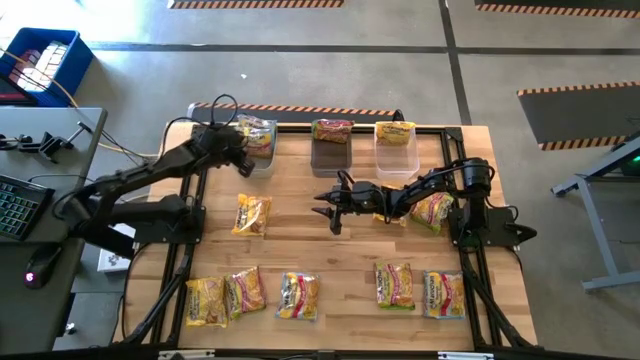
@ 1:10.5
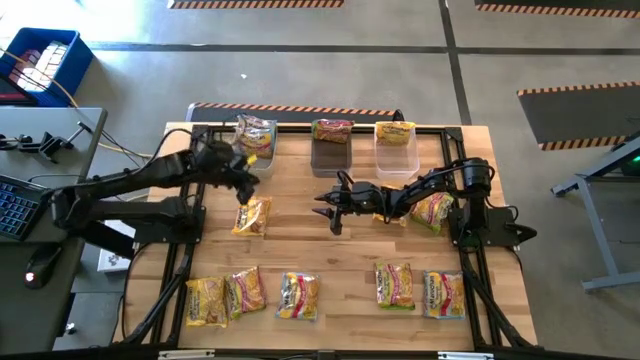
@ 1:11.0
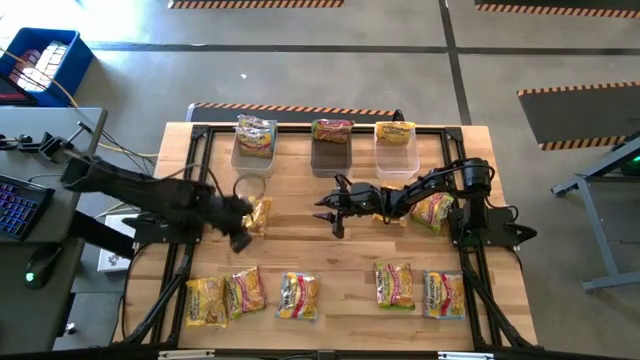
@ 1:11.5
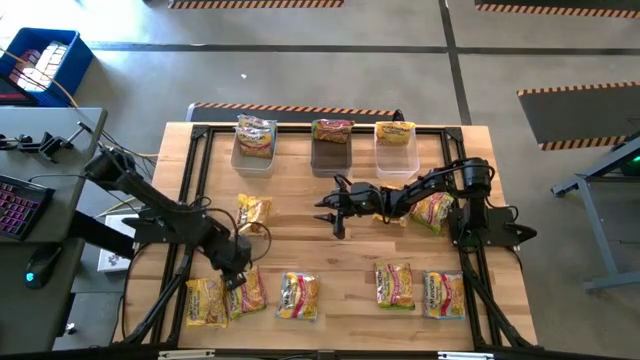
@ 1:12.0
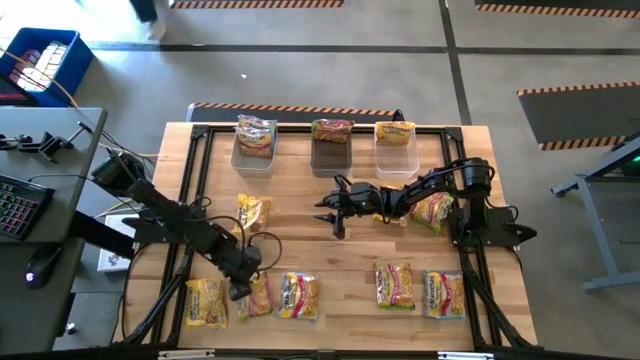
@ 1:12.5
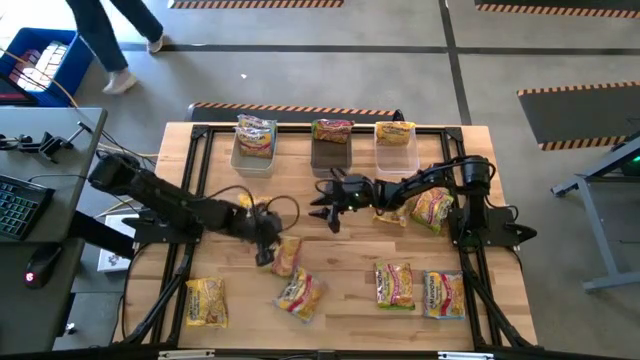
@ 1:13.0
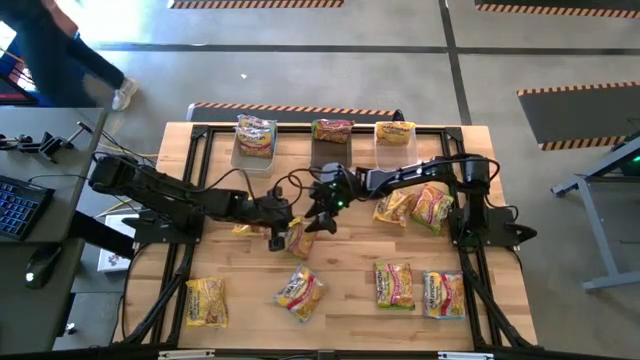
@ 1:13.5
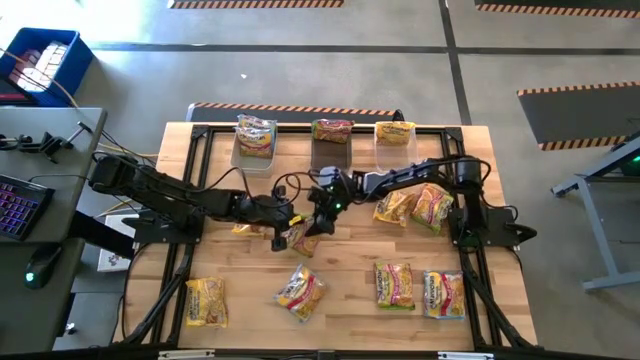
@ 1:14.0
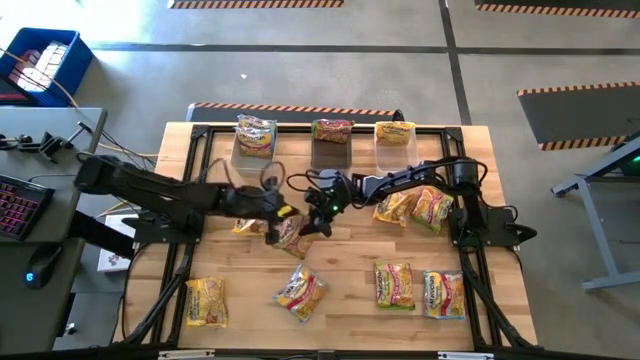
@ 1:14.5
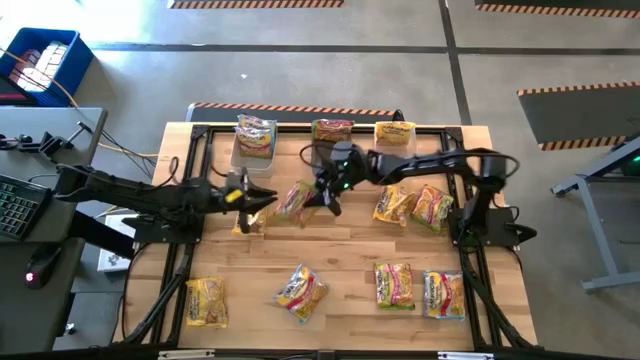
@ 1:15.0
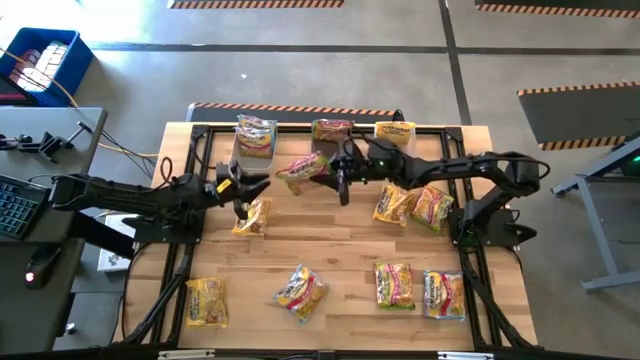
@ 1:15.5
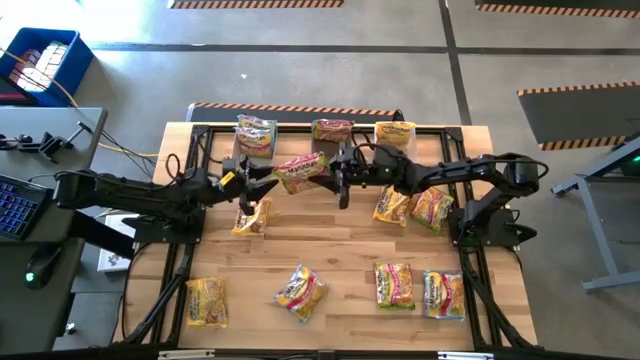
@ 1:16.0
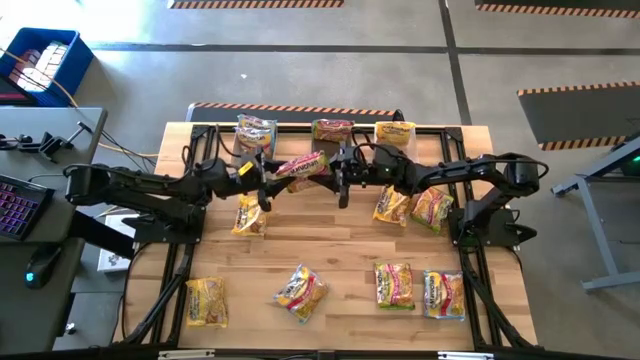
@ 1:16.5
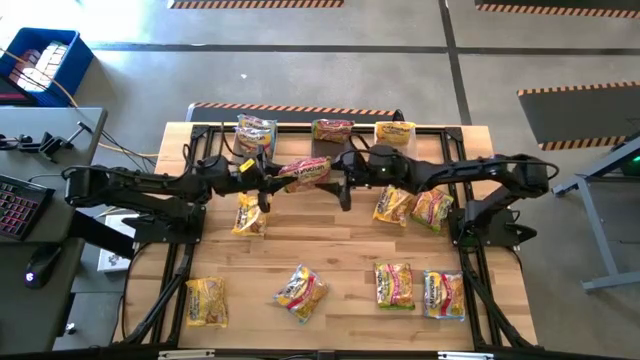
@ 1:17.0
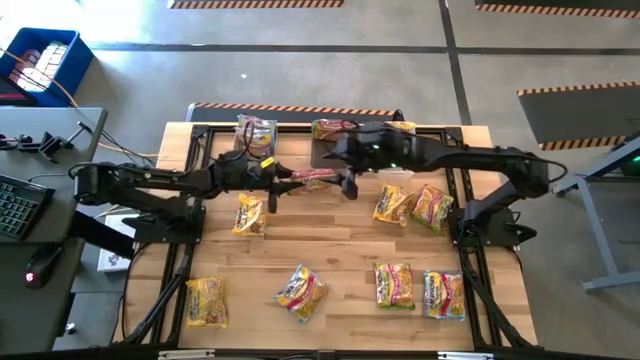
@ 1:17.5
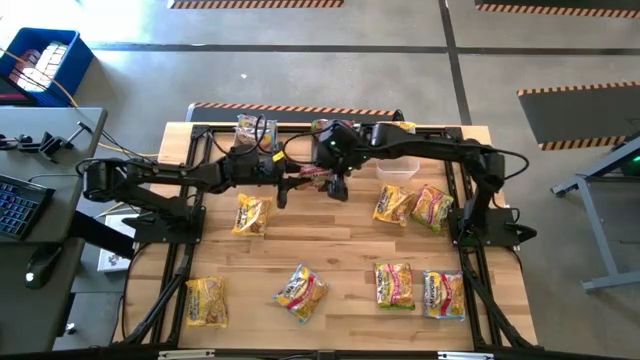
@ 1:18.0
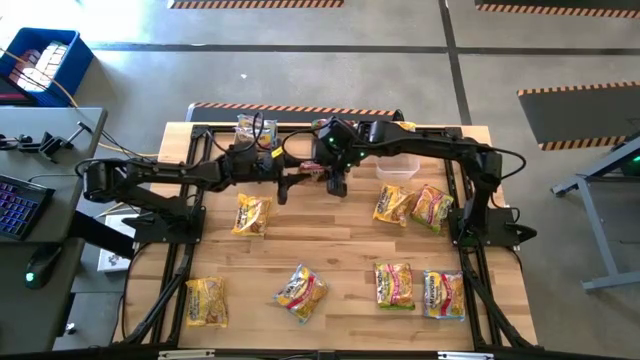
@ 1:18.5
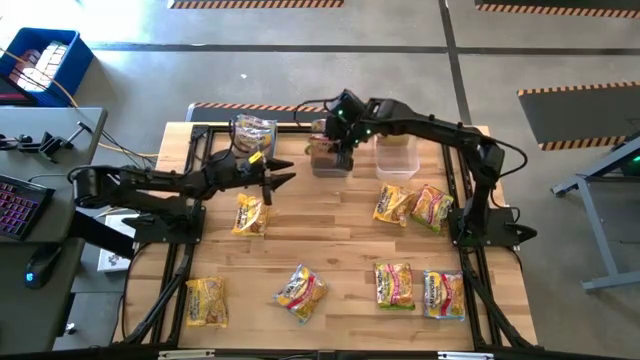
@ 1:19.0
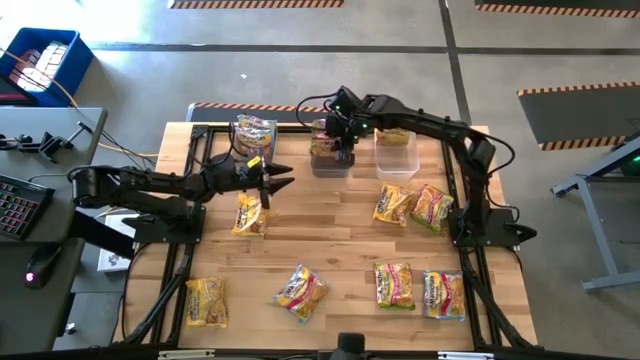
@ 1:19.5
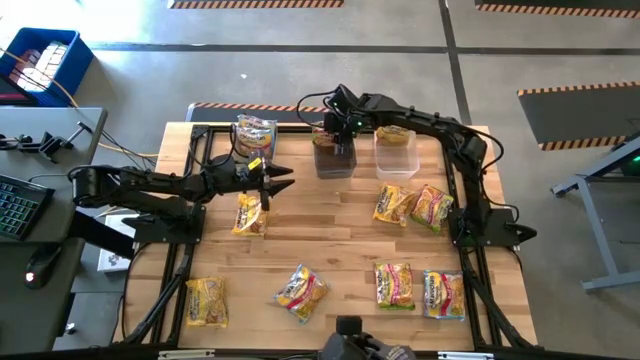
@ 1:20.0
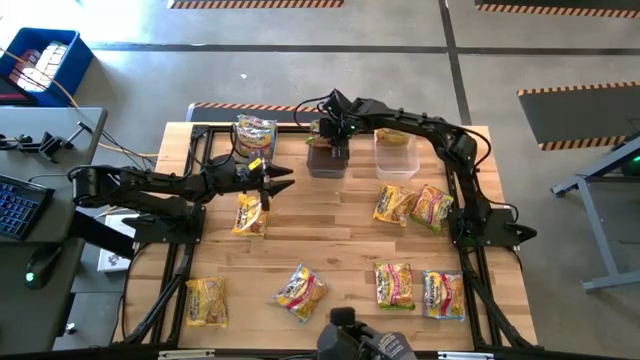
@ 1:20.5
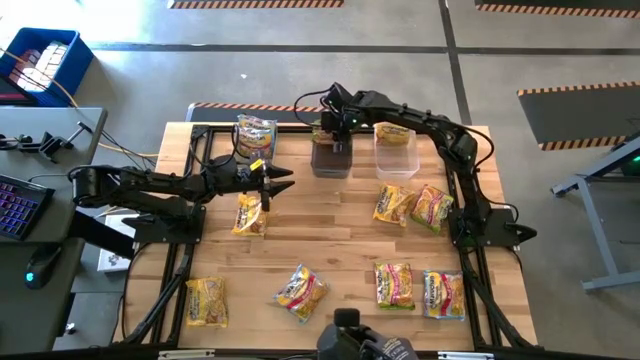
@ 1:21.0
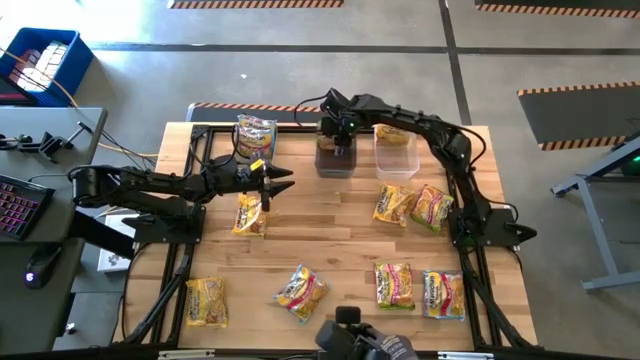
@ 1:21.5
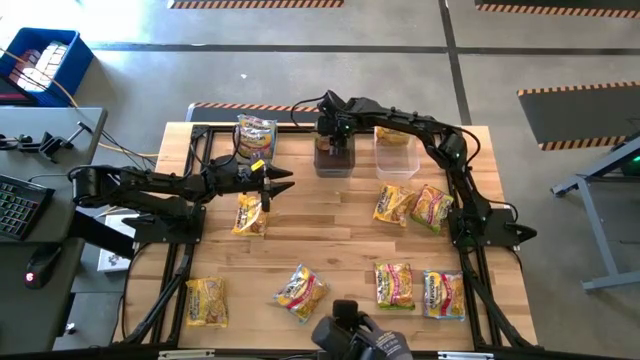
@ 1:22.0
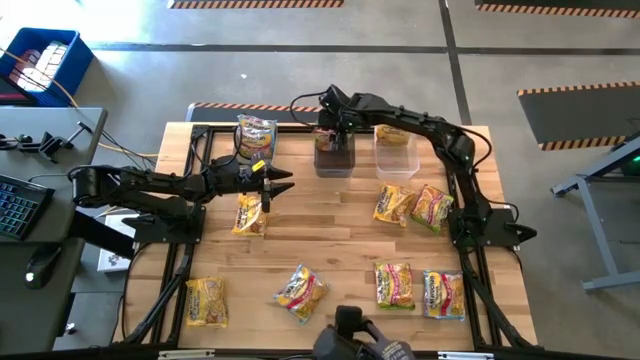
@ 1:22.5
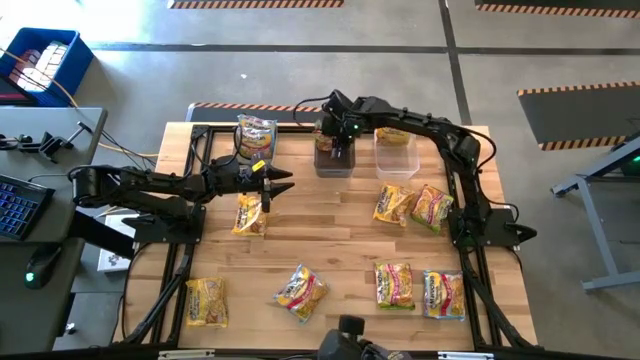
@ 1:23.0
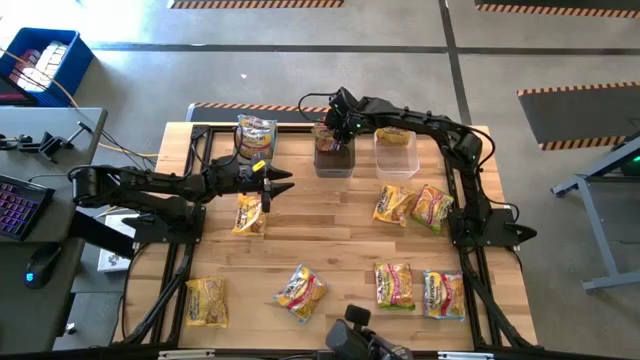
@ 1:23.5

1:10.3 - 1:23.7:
Task: Sort Maruchan noodles
Put the green noodle pack into the black bin

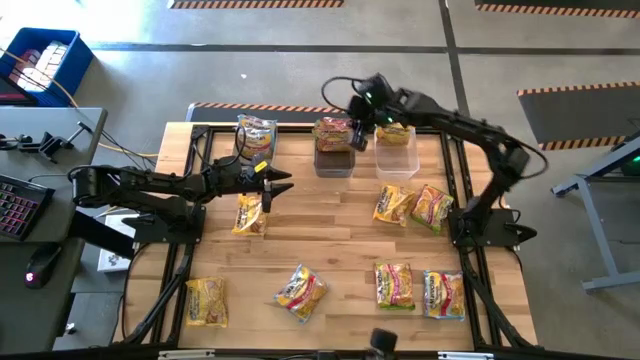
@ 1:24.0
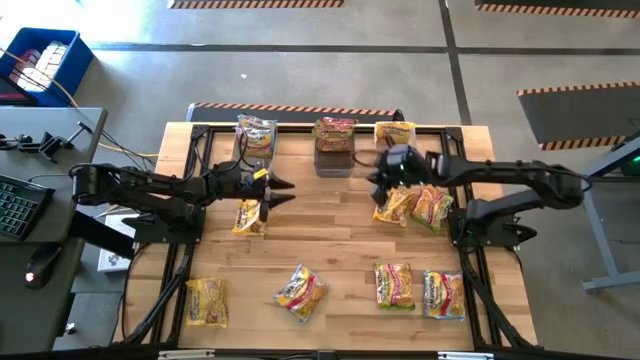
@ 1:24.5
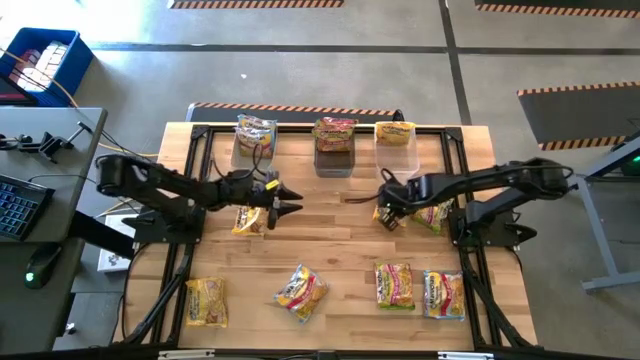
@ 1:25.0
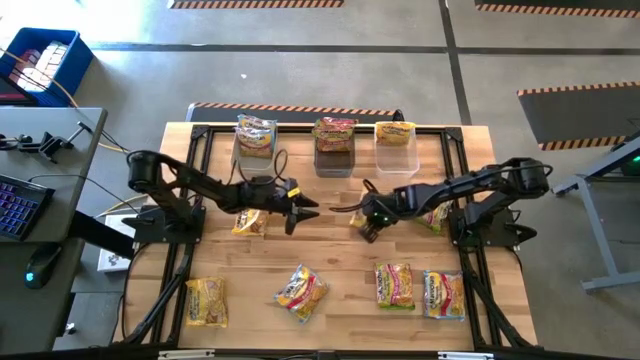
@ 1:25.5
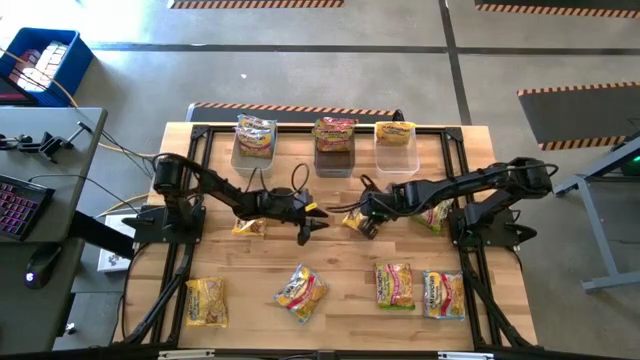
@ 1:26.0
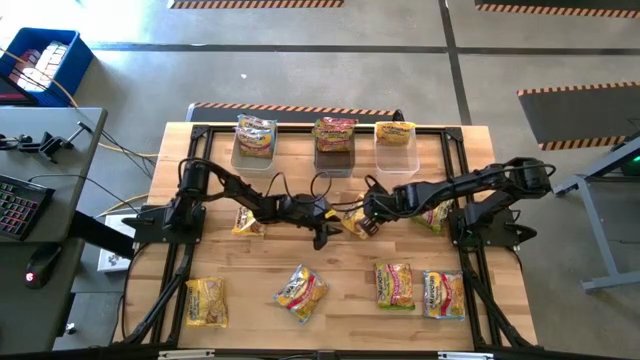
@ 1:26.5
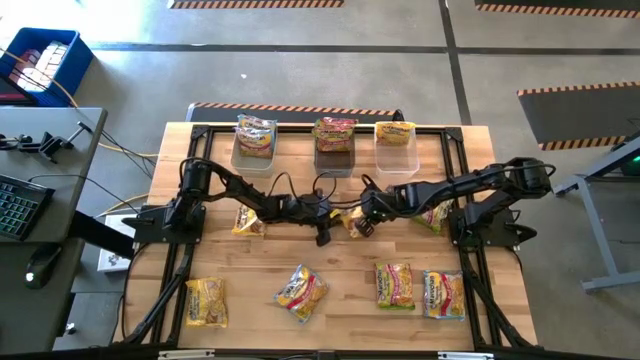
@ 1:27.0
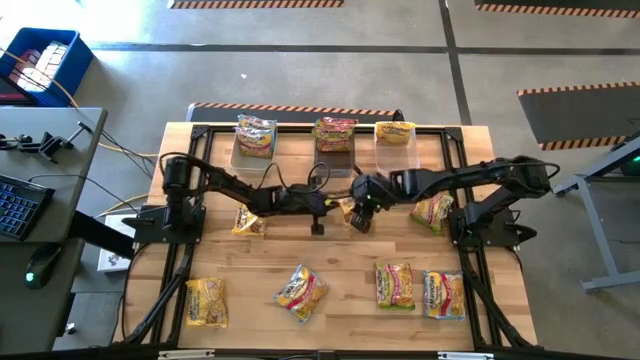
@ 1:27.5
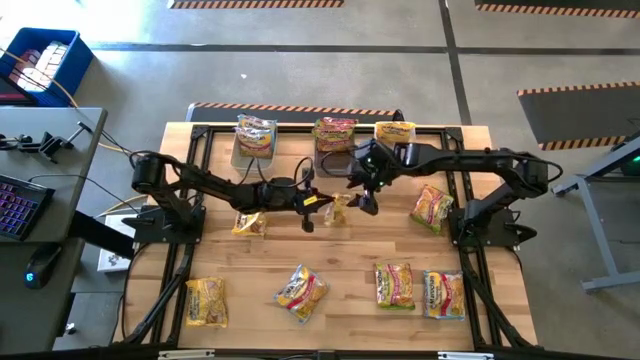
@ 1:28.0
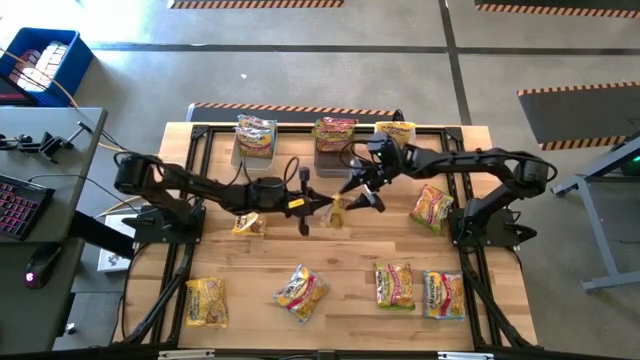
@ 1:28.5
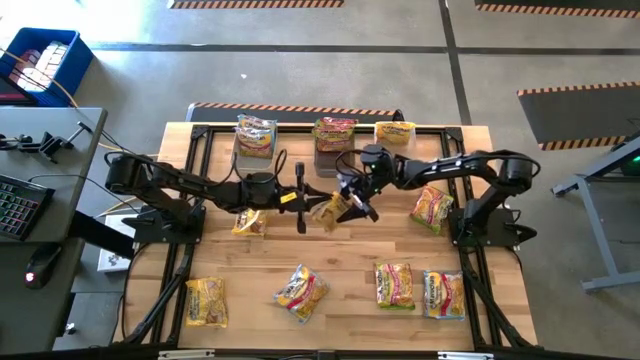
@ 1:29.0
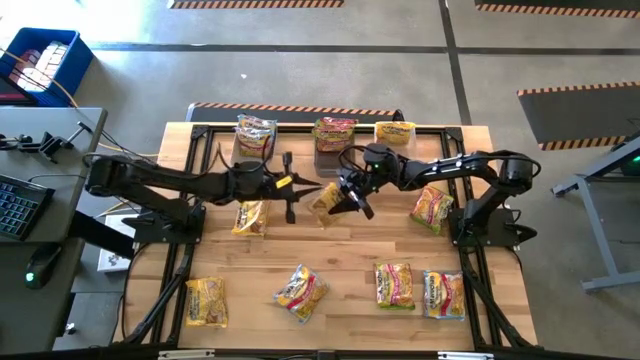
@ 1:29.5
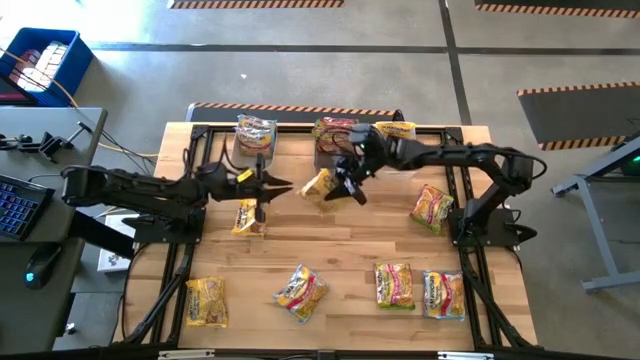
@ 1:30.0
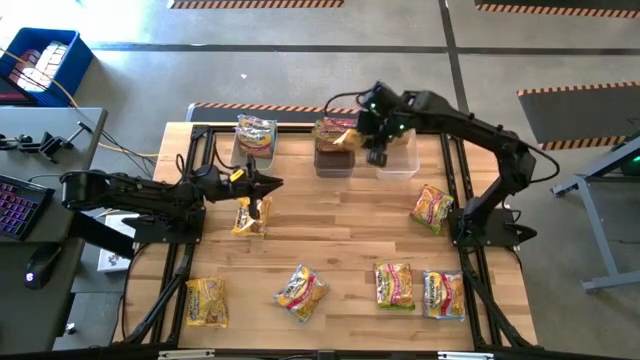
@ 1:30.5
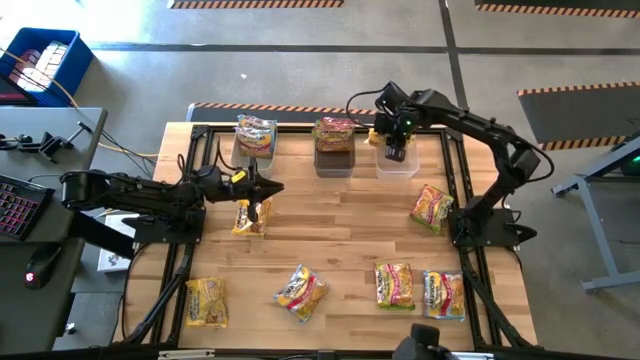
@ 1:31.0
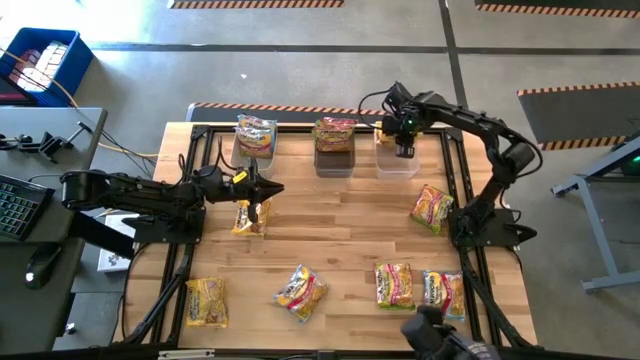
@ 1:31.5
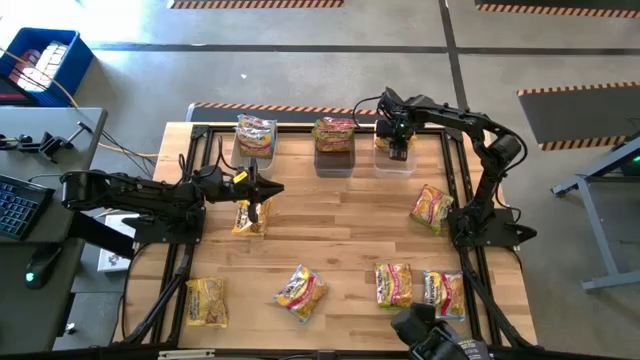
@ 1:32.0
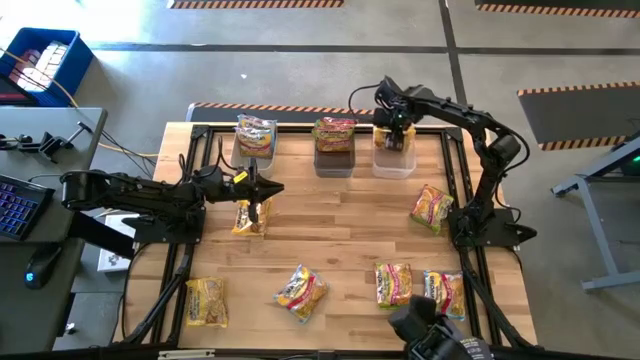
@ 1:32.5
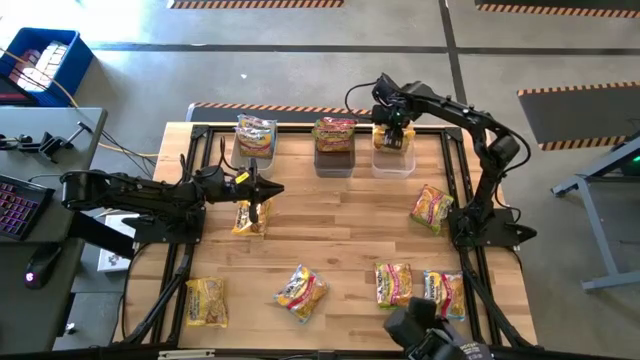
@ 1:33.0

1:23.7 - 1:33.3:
Put the yellow noodle pack into the transparent bin
